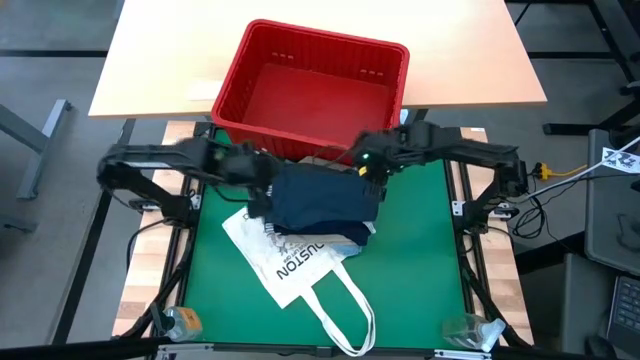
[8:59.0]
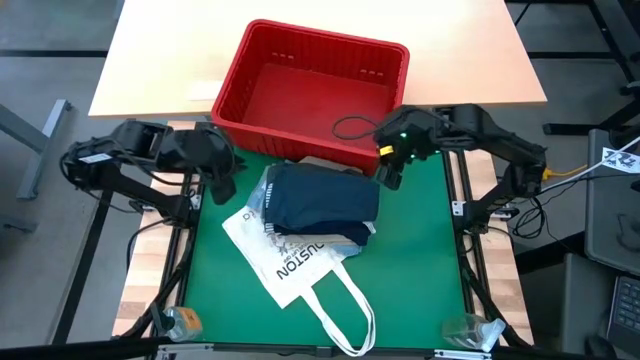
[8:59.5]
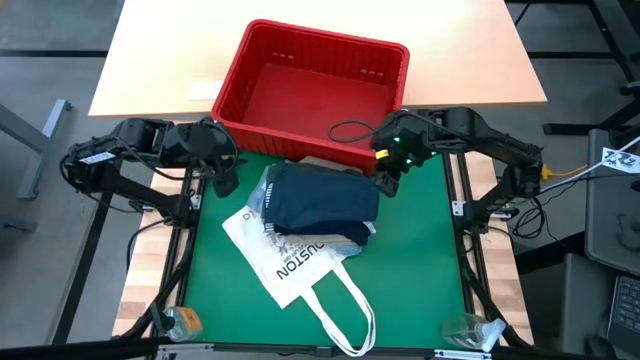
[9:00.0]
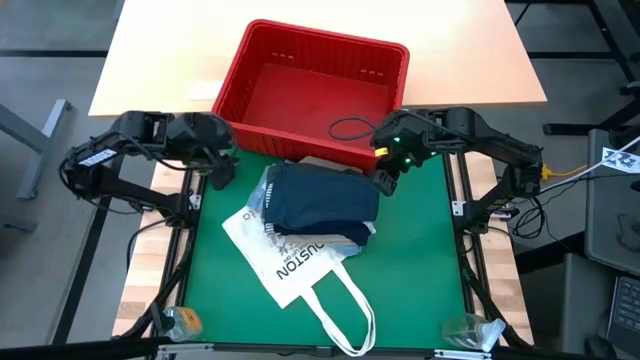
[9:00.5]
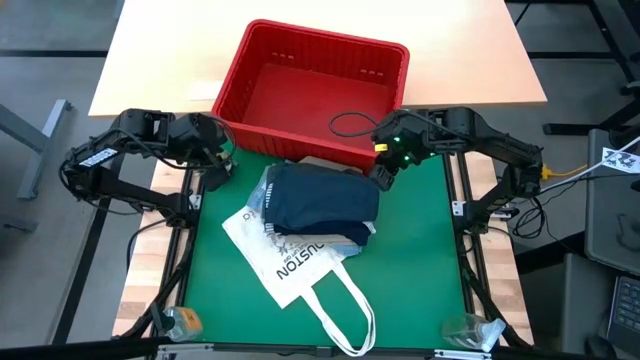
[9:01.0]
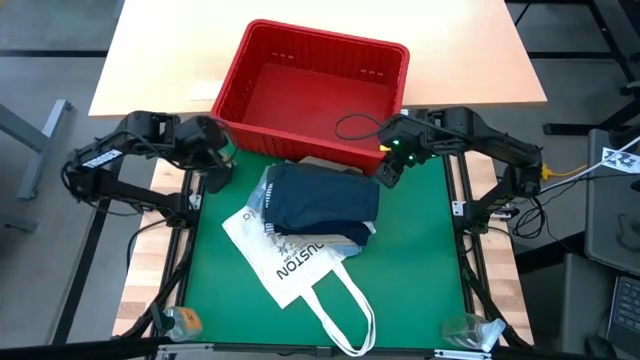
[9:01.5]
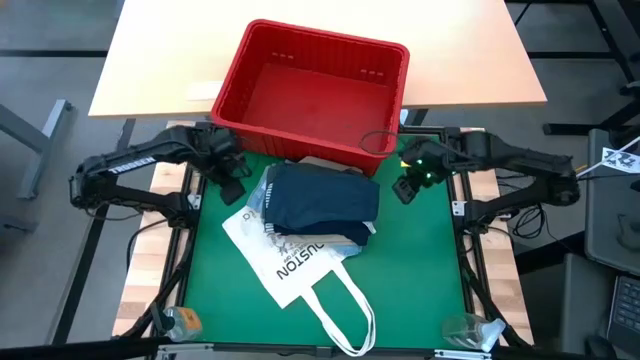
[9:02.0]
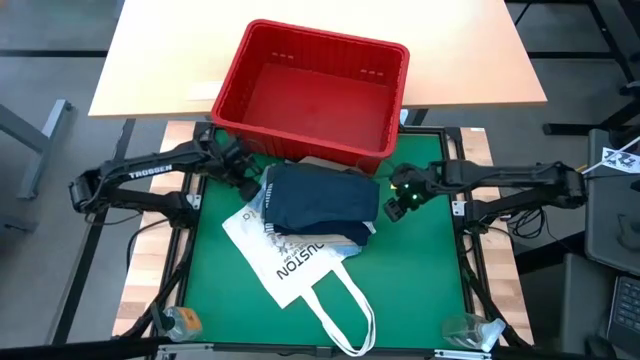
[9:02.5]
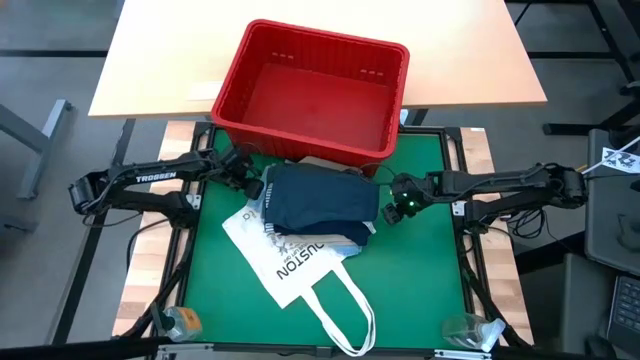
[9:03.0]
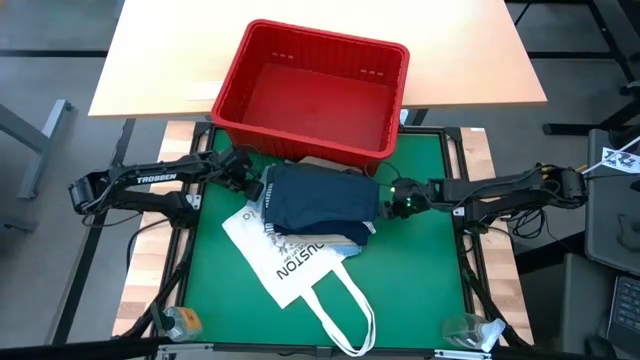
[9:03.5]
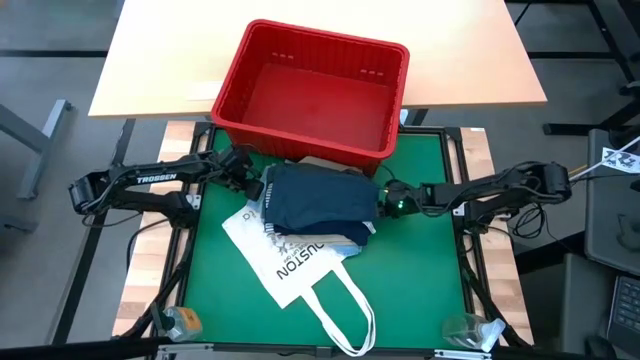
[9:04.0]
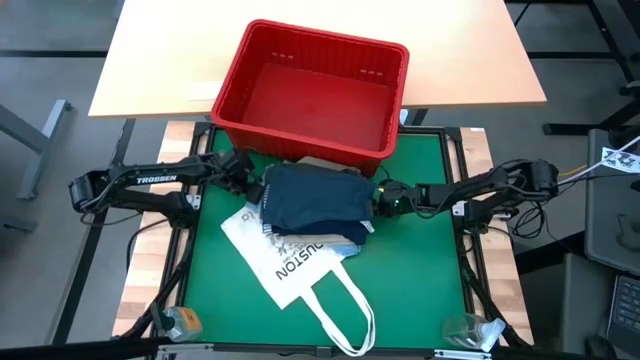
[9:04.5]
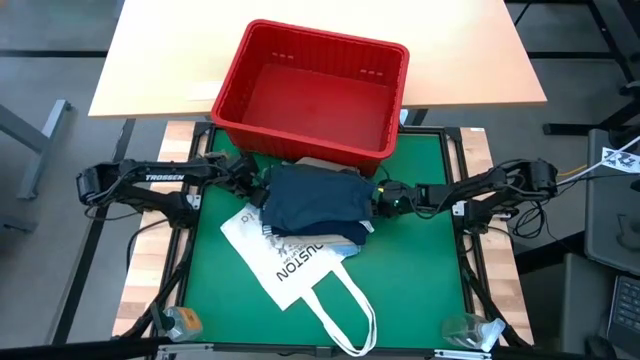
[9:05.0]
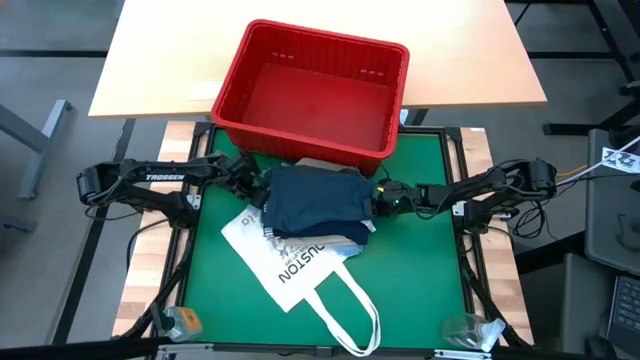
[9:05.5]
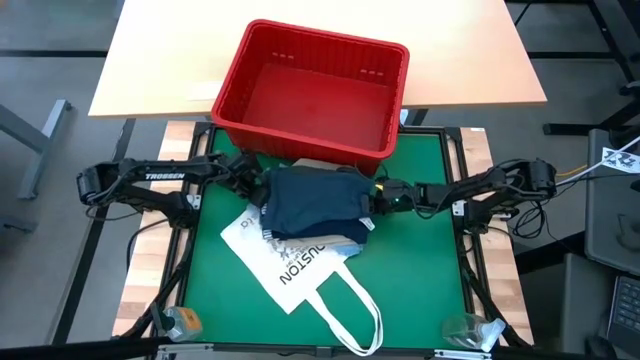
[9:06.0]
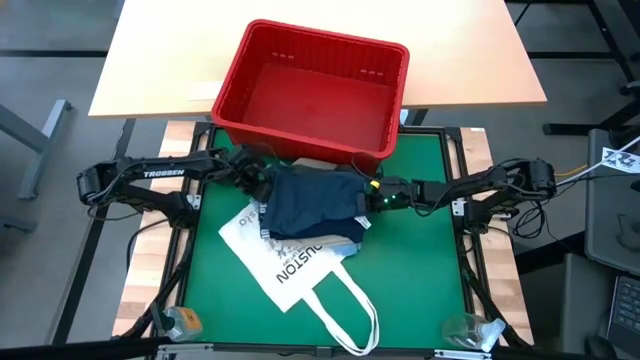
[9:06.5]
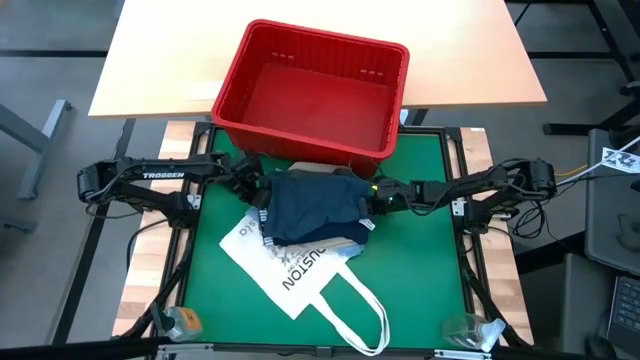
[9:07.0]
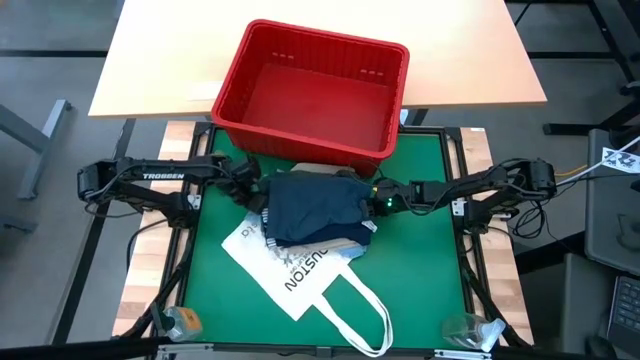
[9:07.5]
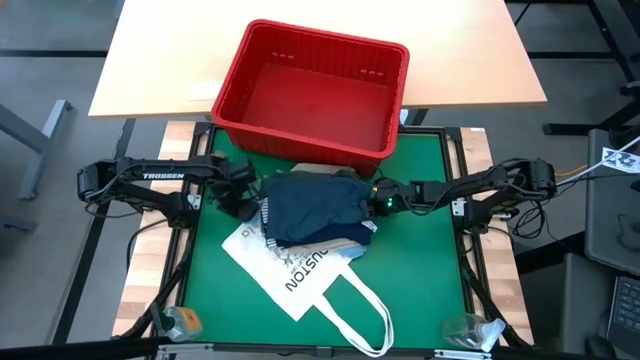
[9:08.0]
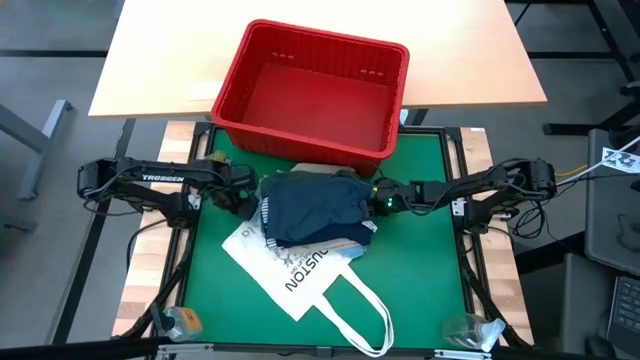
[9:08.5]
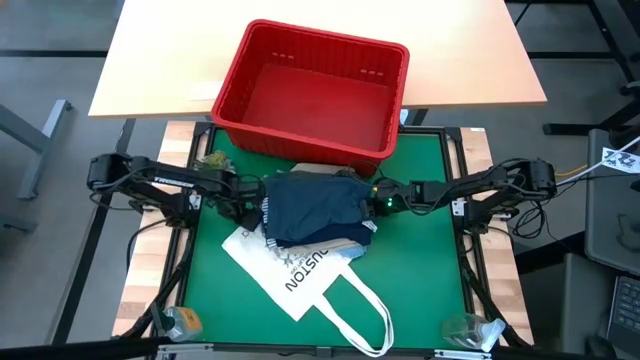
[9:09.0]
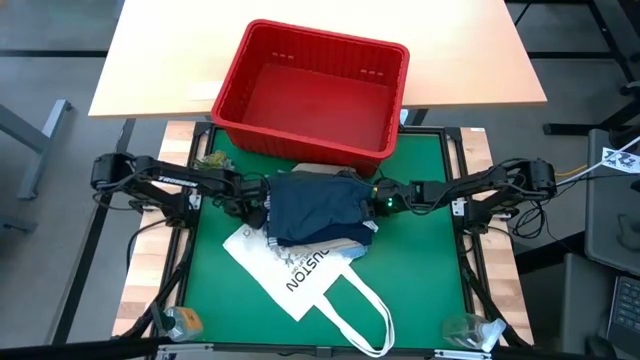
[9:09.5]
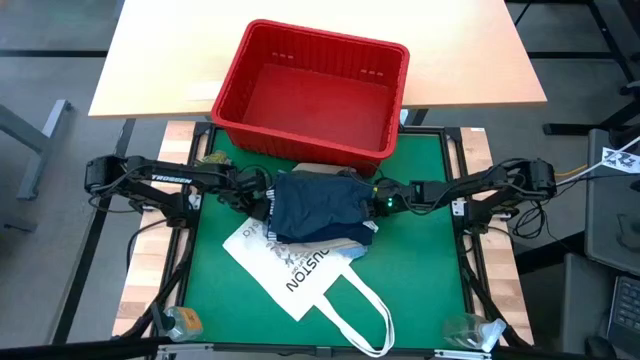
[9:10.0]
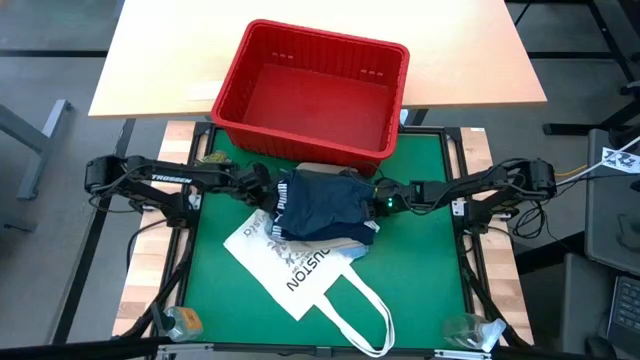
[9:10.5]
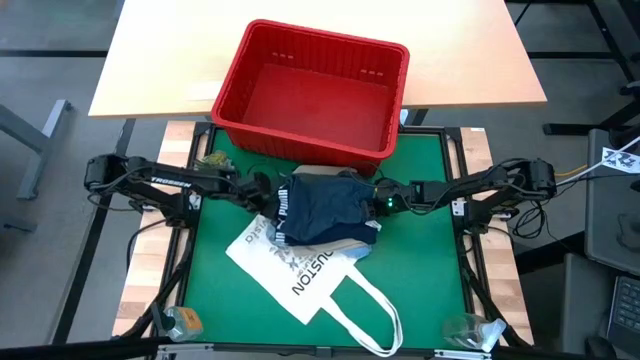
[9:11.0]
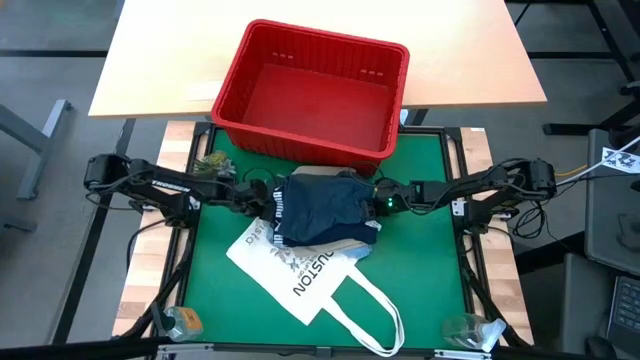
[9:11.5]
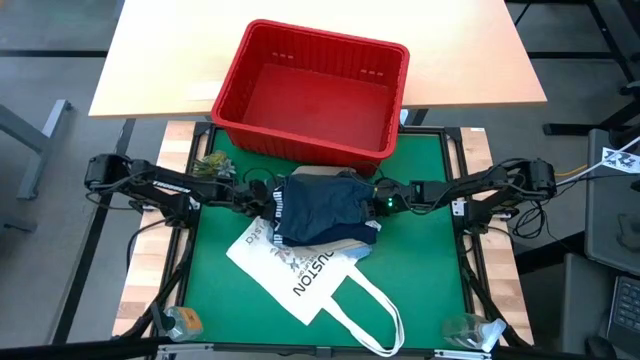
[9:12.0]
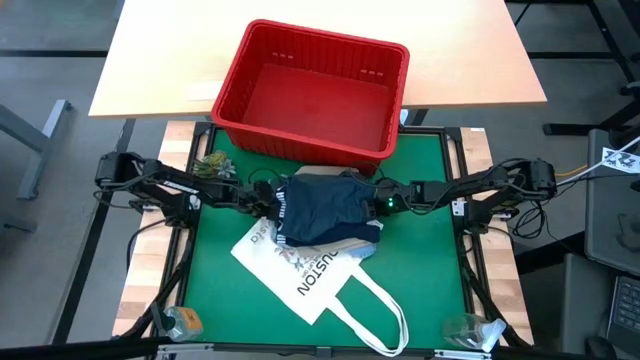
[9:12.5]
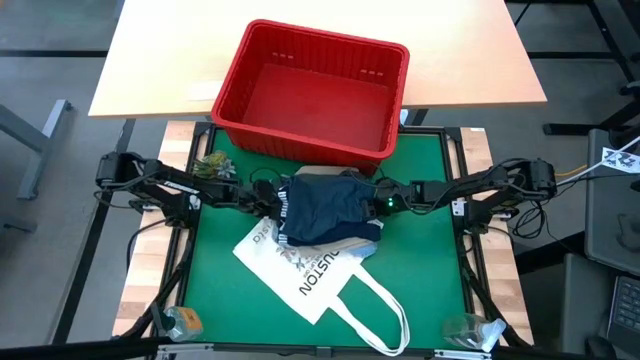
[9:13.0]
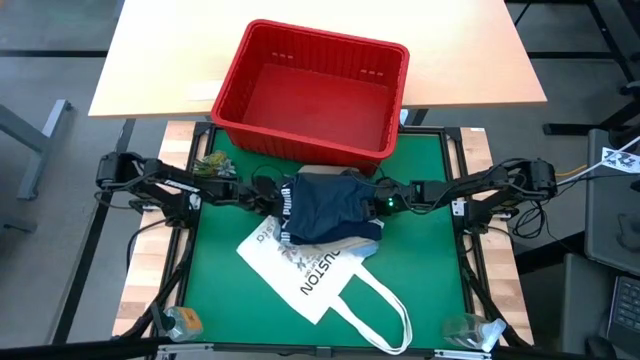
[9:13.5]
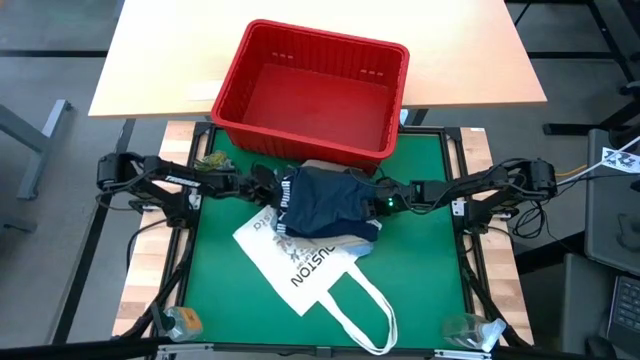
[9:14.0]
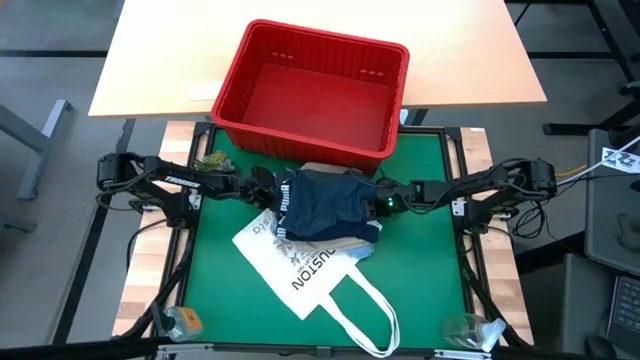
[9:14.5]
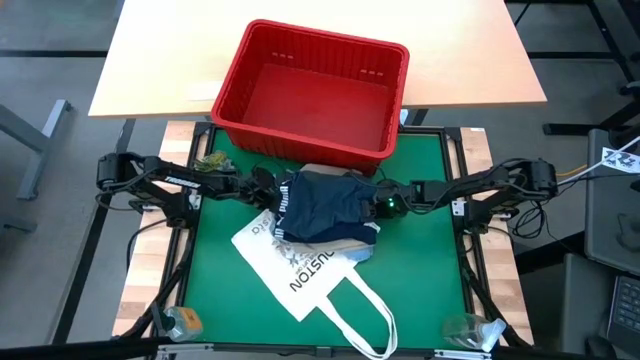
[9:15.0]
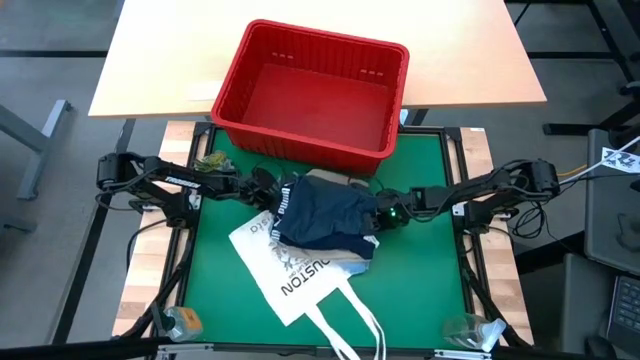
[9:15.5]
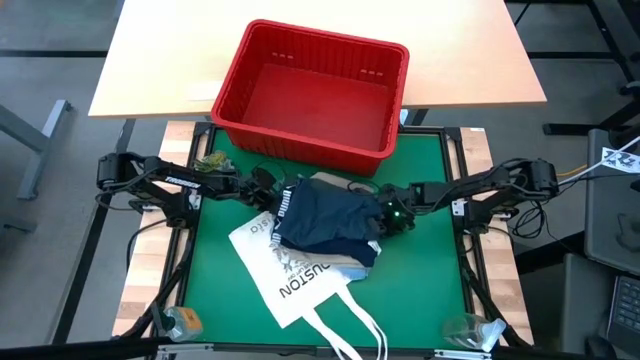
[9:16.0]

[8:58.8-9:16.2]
Task: Fold Laundry from Bin
Put the stacked clothes into the red organizer bin
